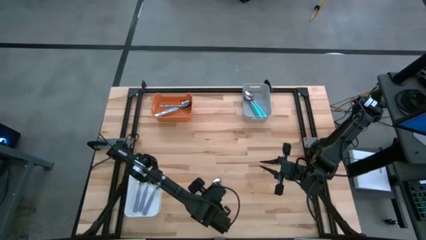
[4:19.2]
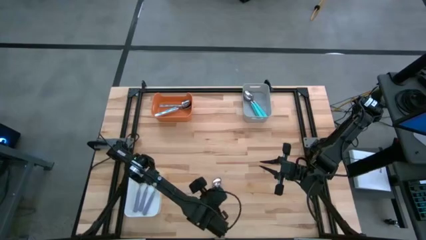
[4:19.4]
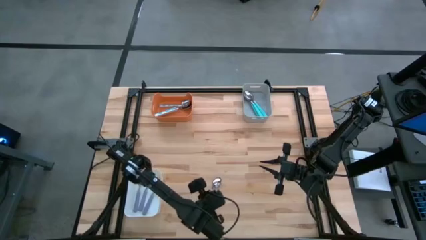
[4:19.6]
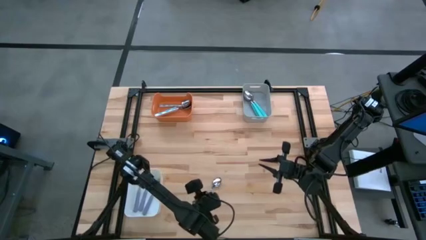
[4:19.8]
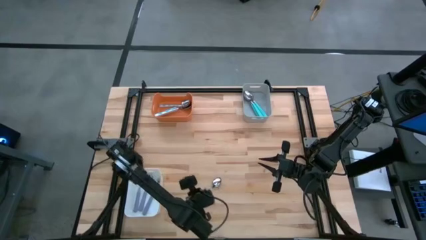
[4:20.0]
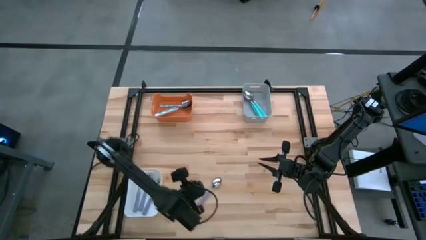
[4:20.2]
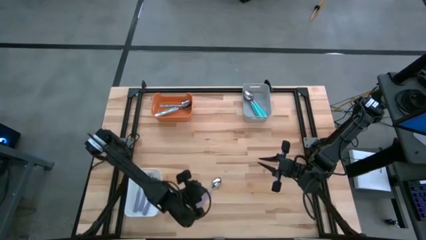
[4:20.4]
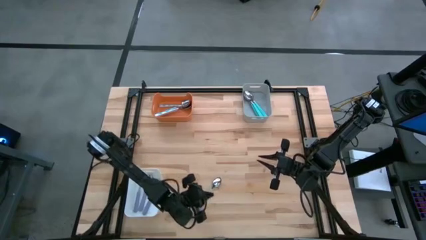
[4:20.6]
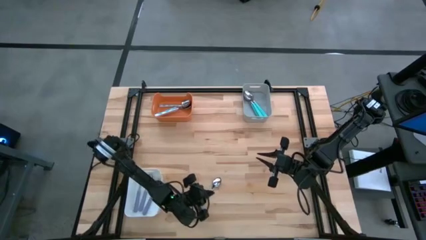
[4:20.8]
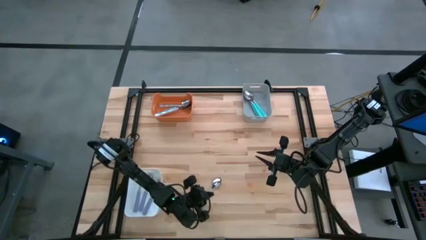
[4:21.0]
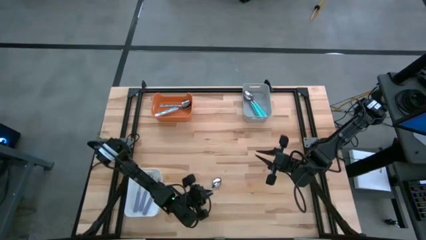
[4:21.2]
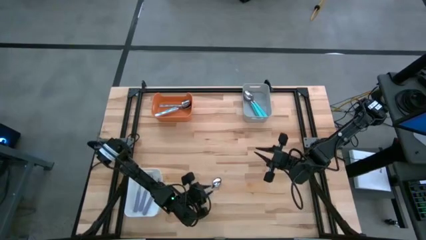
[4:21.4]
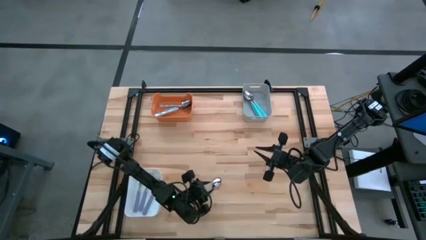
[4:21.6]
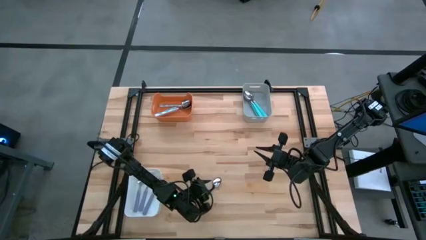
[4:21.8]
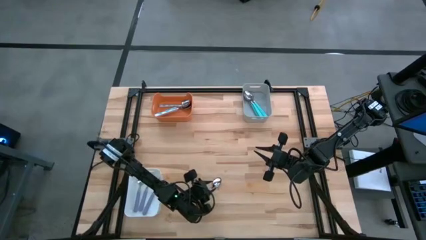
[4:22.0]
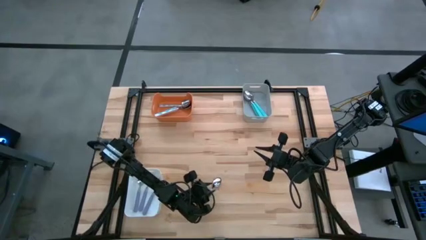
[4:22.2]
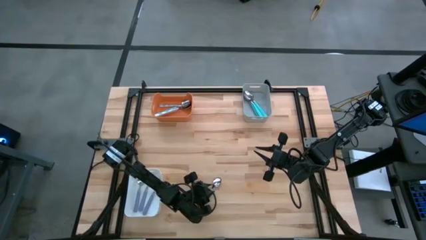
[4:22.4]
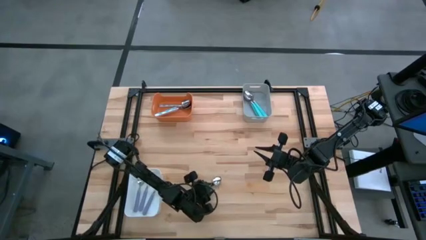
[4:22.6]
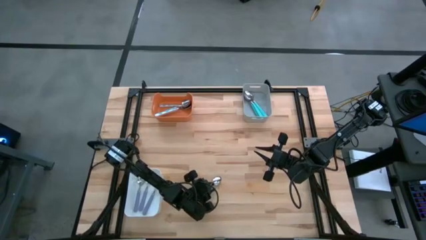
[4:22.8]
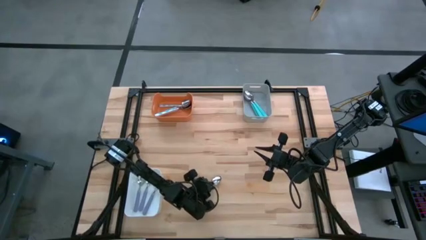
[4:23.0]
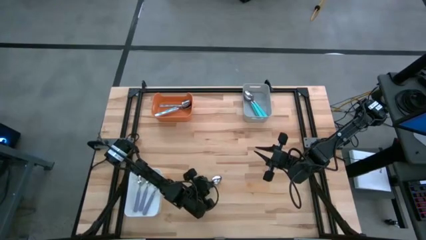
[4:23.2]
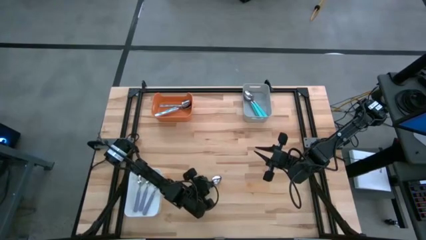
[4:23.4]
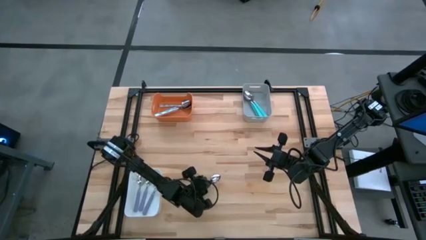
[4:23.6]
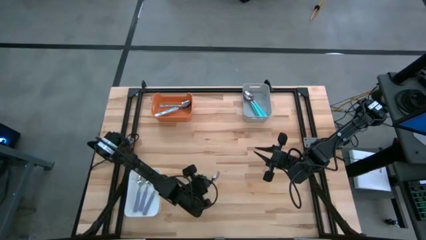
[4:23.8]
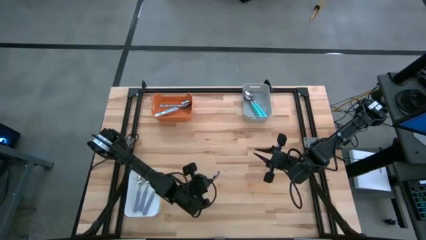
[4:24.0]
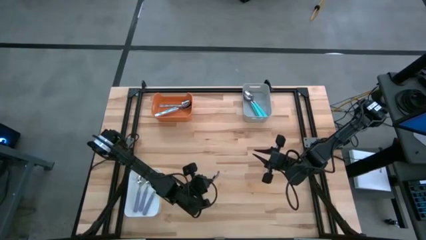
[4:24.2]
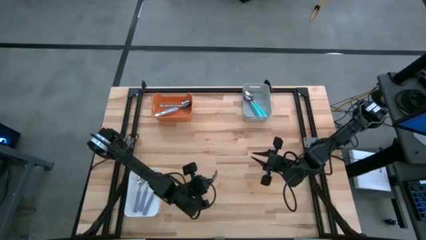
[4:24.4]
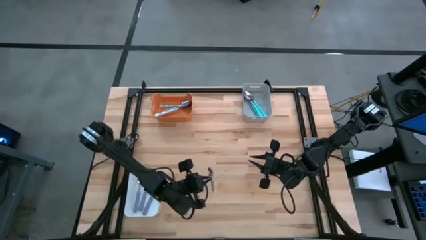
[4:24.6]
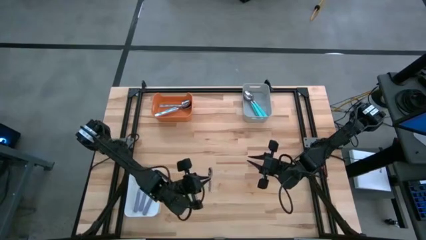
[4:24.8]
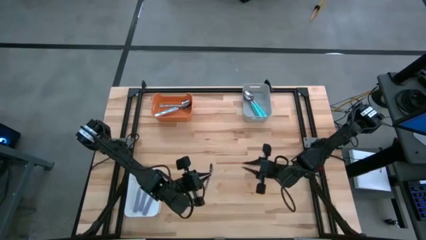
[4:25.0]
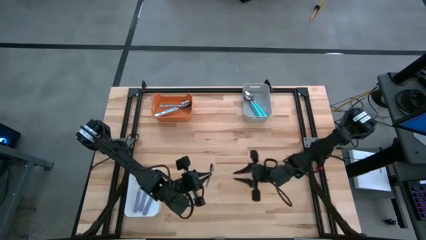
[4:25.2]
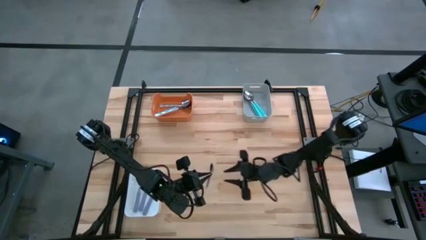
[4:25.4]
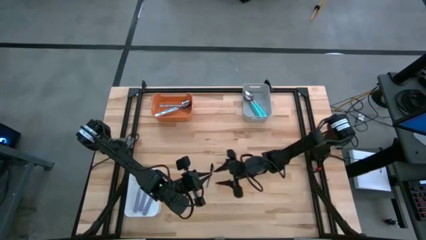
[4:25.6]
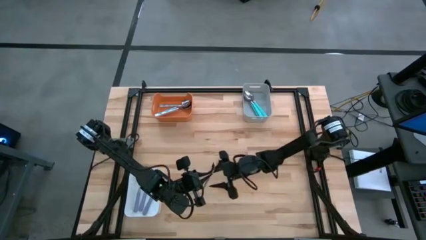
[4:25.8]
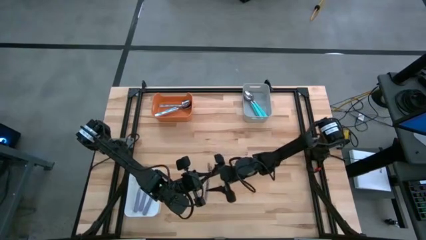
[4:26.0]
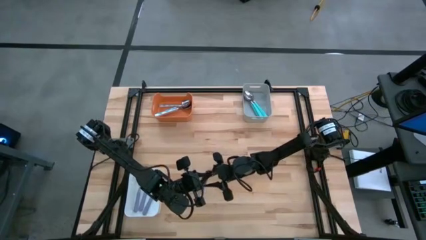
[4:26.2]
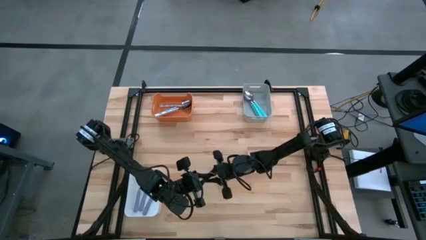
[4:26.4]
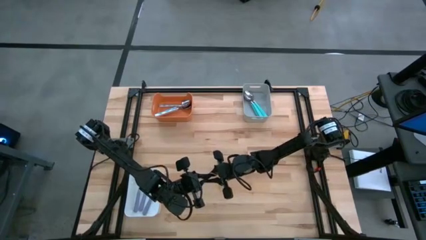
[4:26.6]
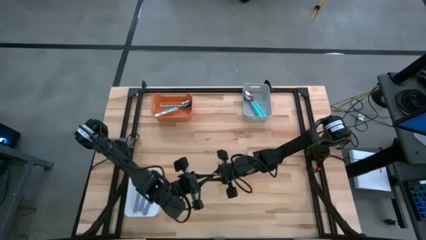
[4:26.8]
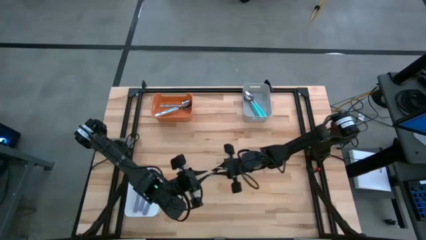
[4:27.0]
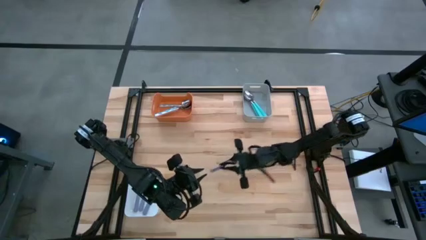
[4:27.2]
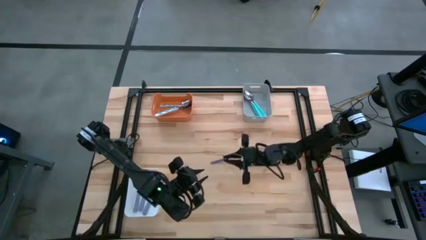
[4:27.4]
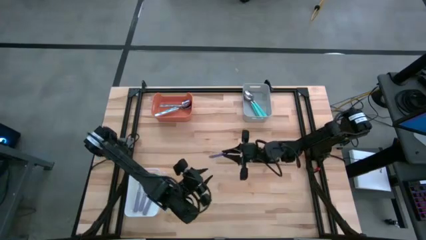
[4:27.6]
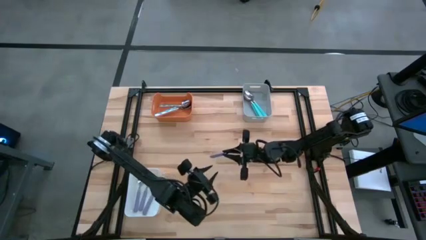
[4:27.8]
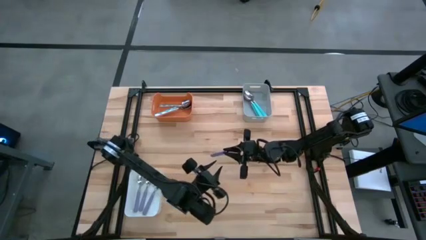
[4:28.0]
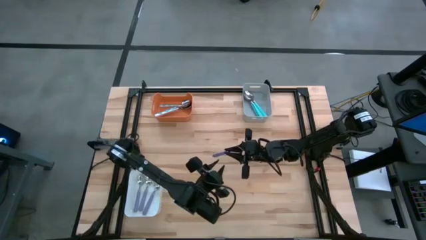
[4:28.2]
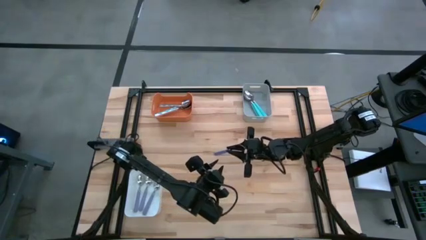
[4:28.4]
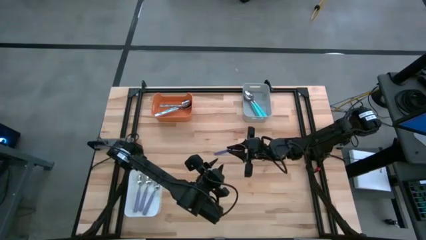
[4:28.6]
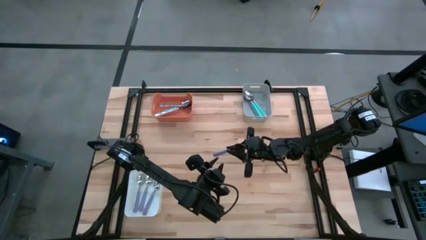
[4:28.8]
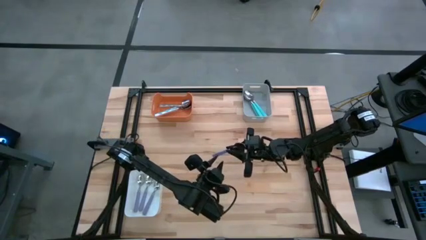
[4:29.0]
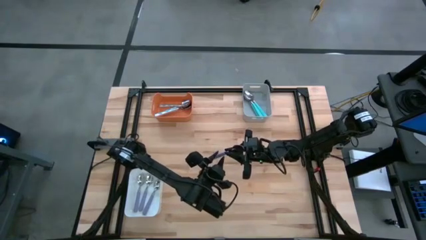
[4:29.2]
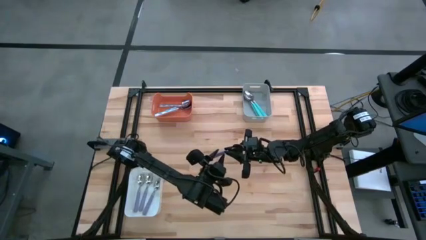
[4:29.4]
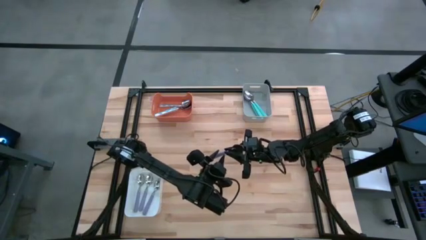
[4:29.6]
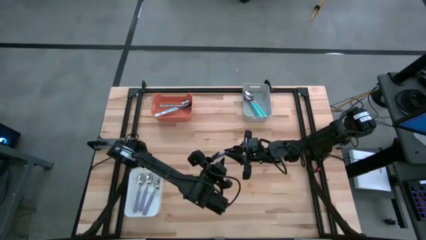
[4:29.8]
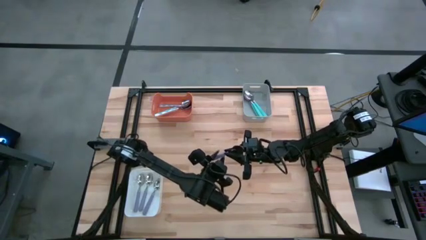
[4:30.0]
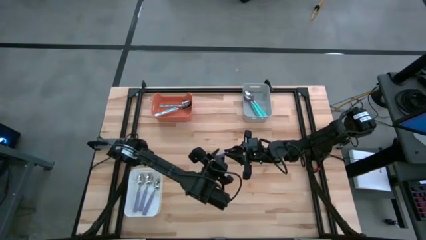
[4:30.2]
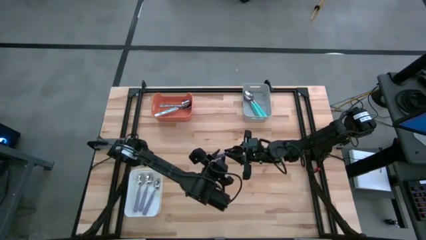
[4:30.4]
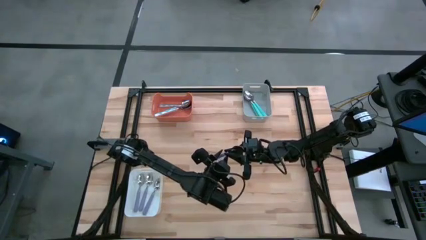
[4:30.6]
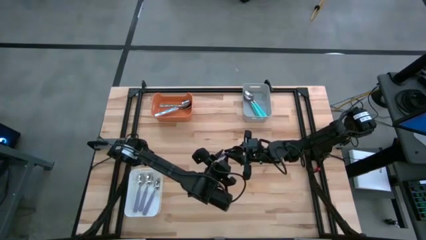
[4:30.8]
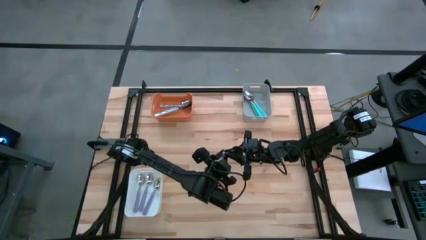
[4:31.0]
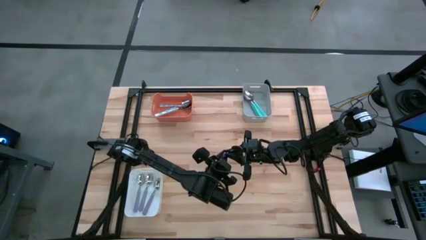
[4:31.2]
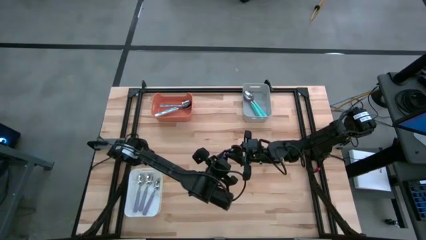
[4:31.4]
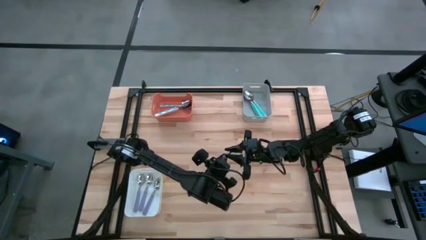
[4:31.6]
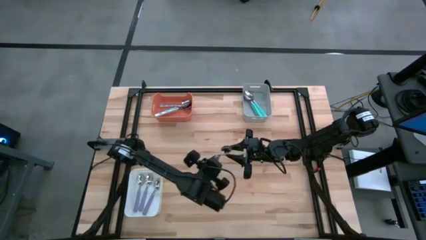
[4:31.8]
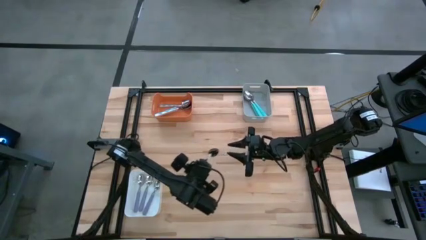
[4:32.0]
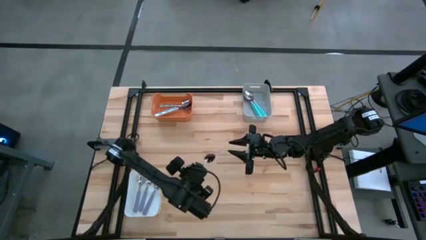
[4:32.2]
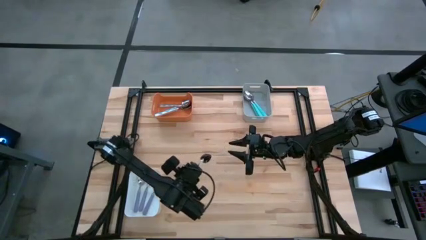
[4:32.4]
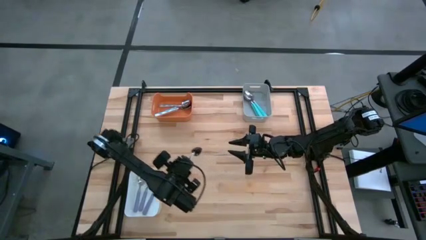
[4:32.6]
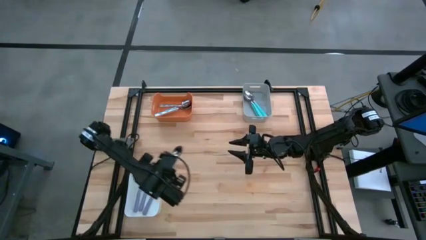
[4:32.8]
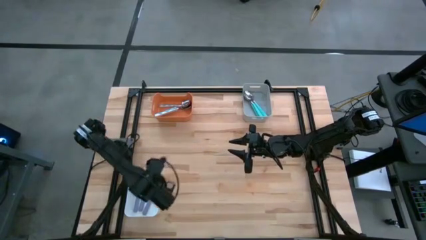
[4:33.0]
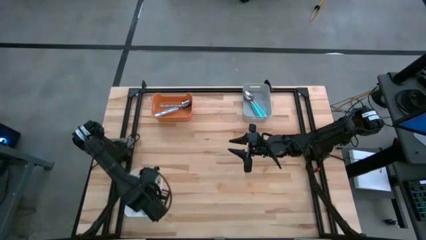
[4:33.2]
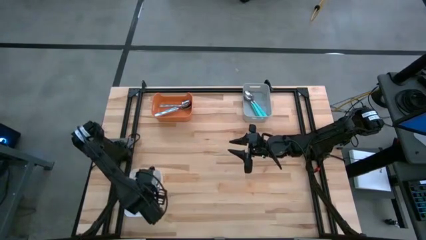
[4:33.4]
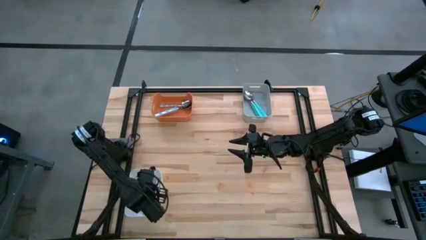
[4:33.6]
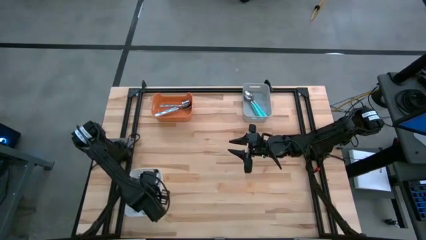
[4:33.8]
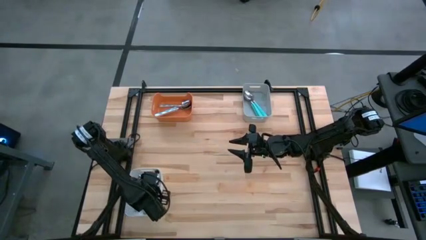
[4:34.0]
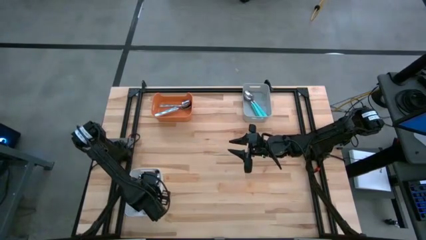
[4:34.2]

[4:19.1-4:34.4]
Task: Sort silverware by color (type)
Put the purple spoon into the white bin
